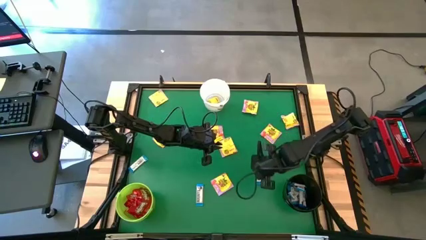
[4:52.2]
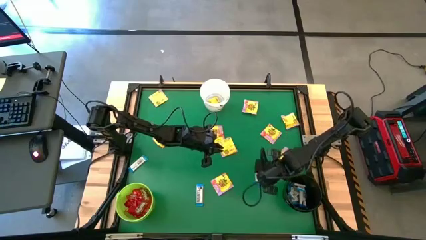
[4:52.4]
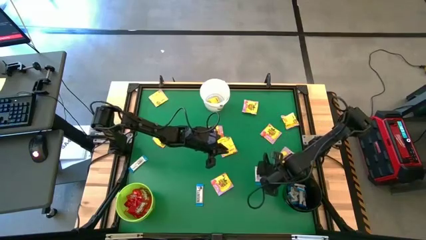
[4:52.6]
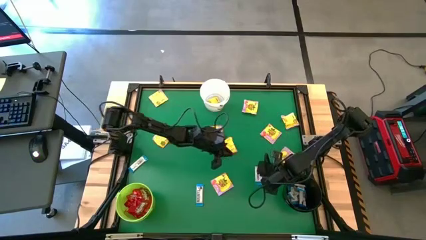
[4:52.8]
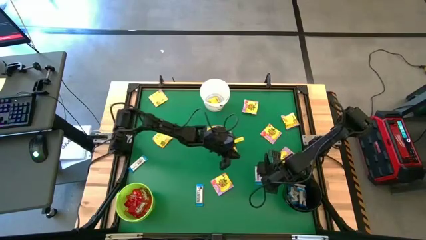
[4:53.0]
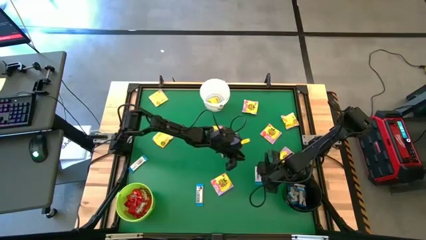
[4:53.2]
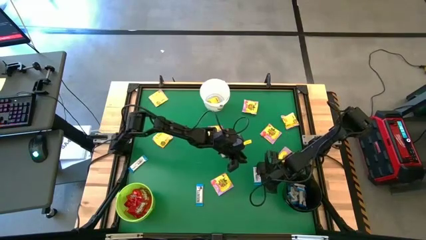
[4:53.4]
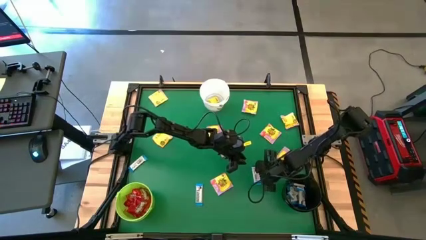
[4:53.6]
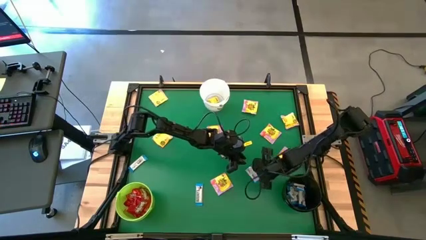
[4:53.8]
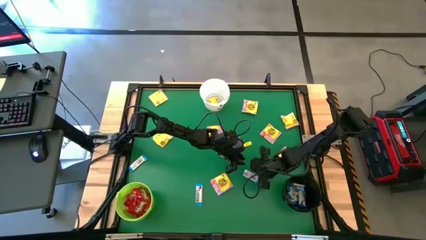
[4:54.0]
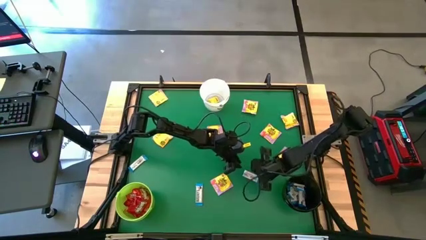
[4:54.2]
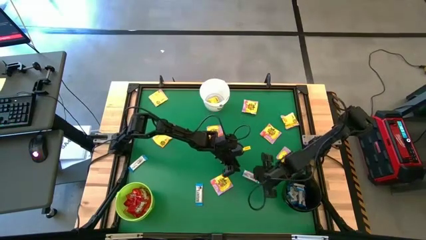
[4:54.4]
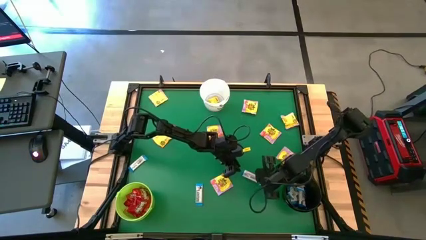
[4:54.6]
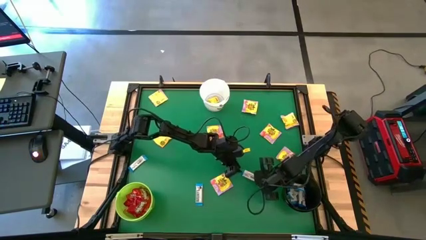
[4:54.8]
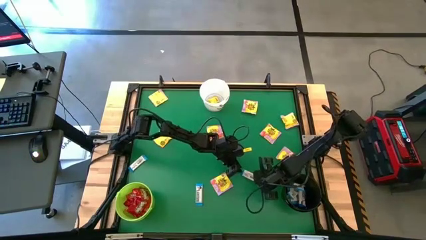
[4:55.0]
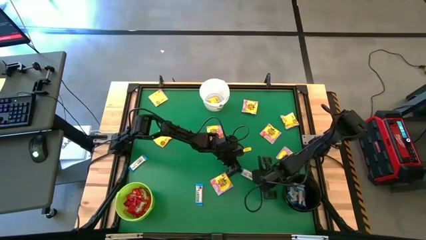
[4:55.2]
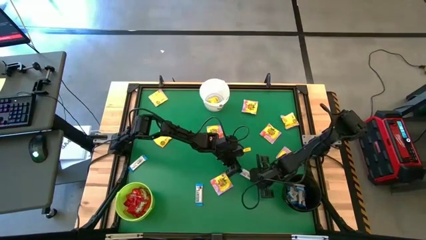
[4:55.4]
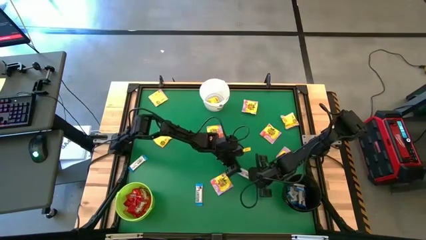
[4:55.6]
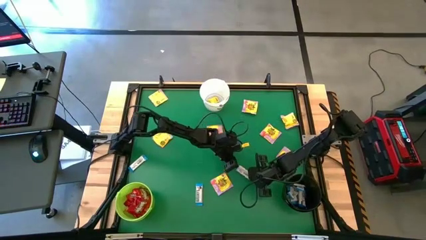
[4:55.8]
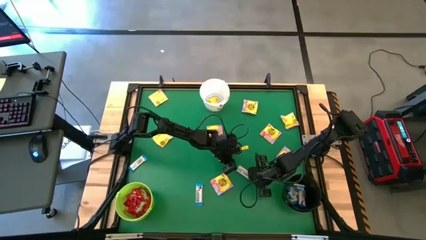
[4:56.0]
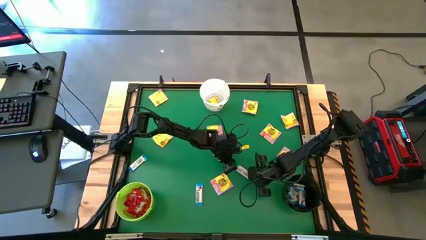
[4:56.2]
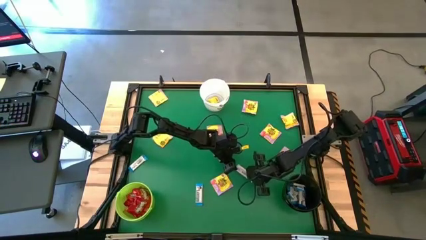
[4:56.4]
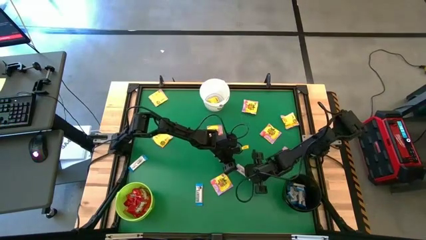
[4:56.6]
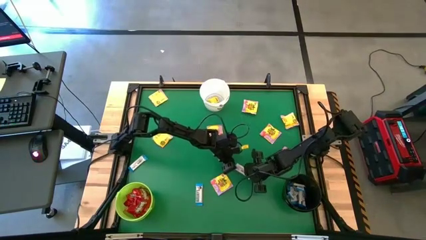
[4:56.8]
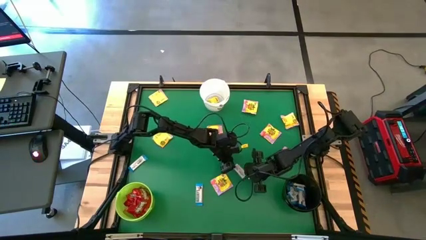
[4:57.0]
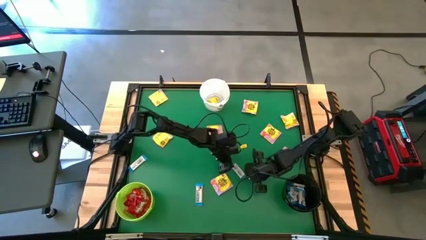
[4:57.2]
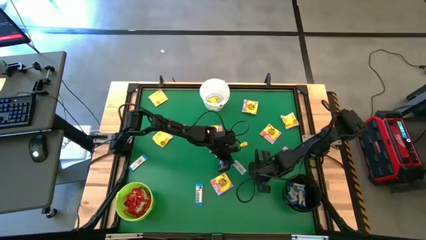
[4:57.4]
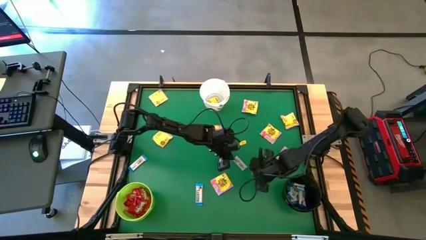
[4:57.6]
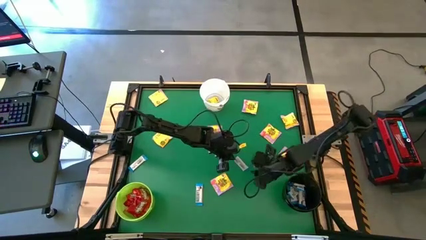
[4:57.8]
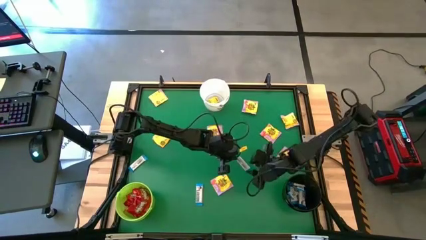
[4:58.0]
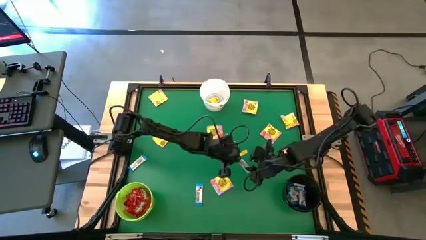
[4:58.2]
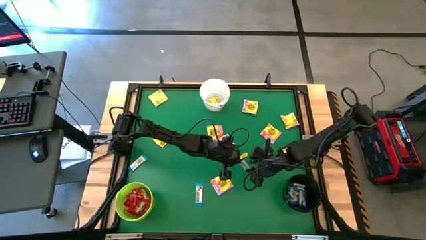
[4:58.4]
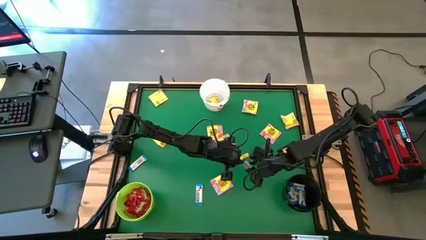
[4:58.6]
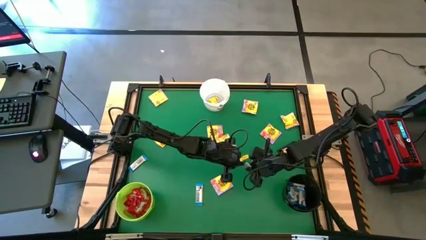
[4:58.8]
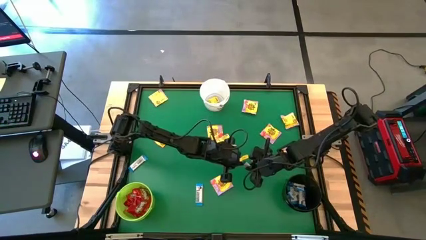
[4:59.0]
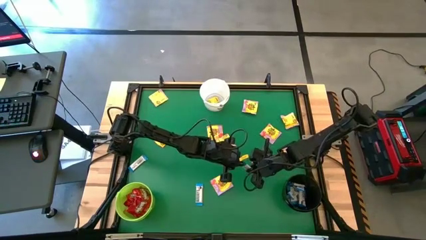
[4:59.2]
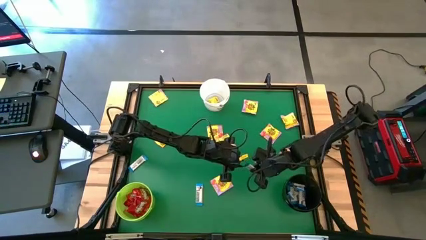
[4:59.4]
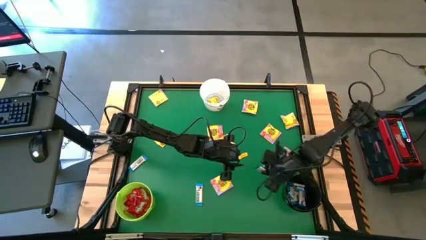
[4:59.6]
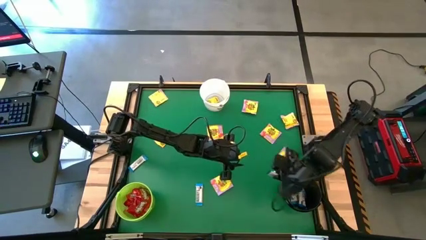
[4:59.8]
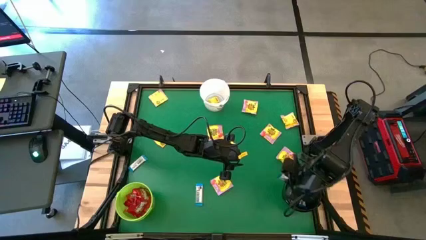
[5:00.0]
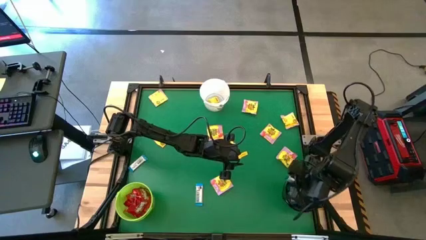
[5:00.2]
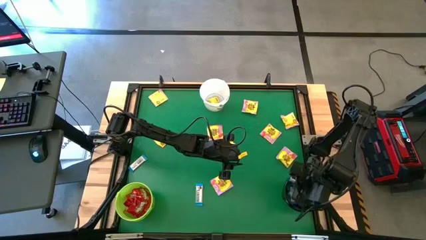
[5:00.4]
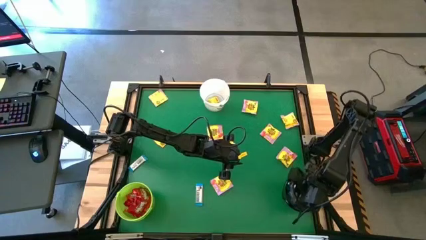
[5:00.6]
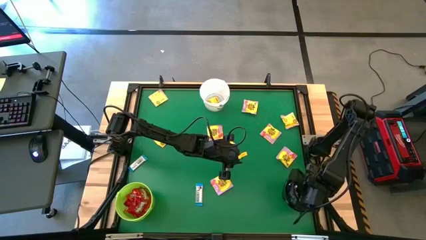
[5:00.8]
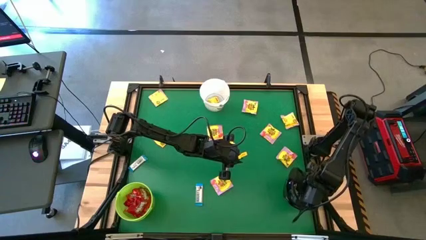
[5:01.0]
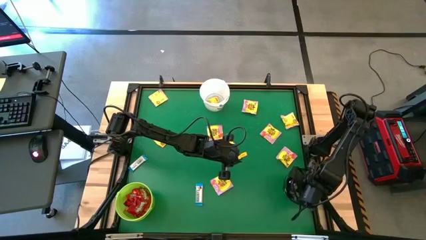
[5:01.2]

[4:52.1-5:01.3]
Task: Sort candy by brand, put in halloween buckets
Put the white candy into the black bucket

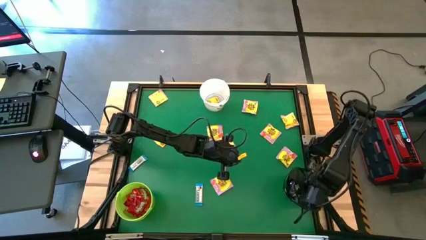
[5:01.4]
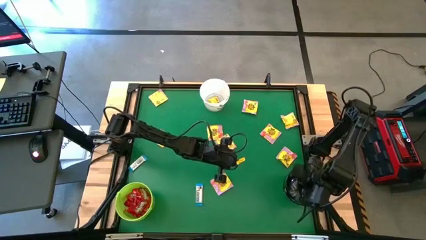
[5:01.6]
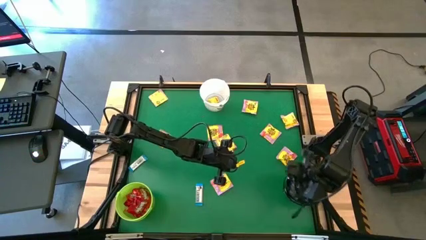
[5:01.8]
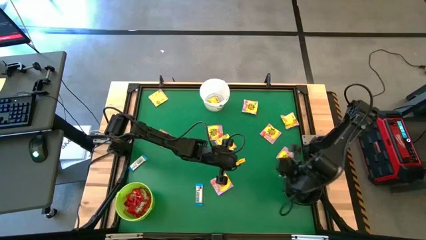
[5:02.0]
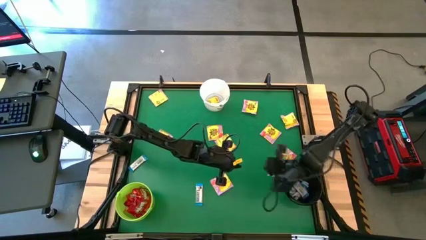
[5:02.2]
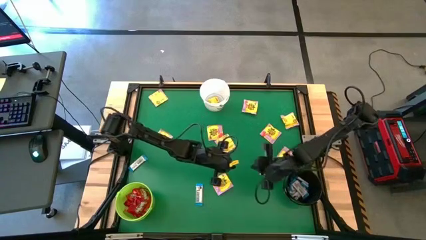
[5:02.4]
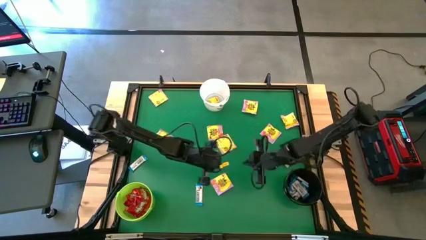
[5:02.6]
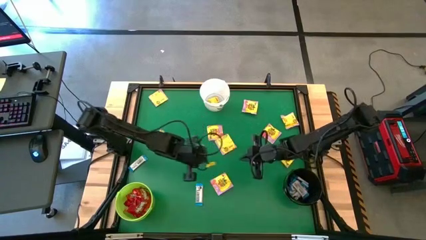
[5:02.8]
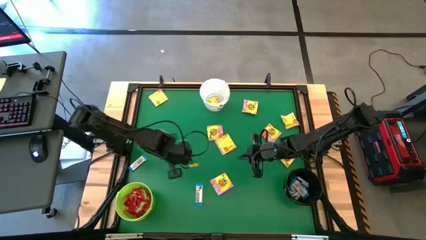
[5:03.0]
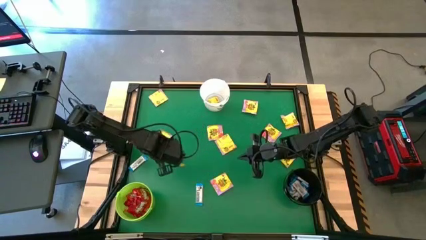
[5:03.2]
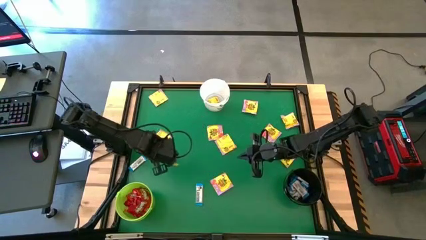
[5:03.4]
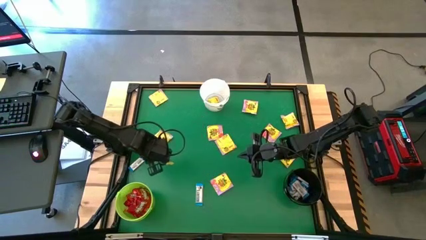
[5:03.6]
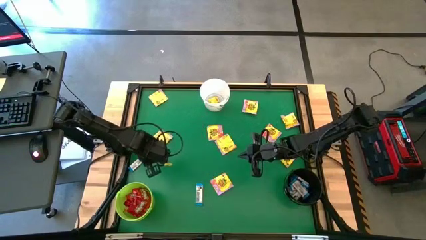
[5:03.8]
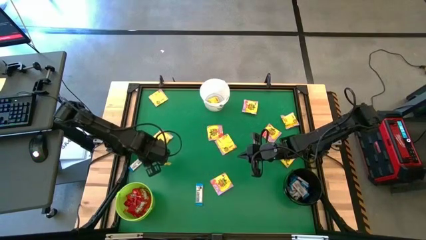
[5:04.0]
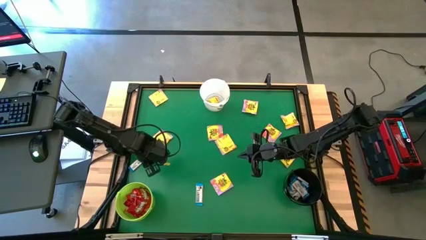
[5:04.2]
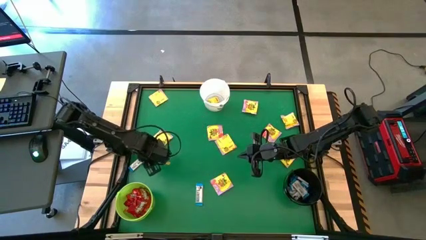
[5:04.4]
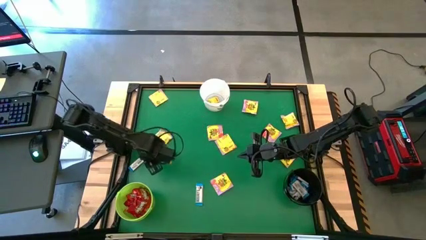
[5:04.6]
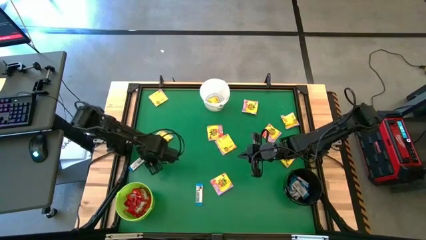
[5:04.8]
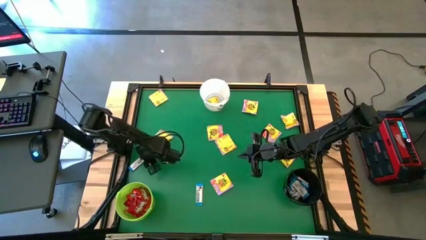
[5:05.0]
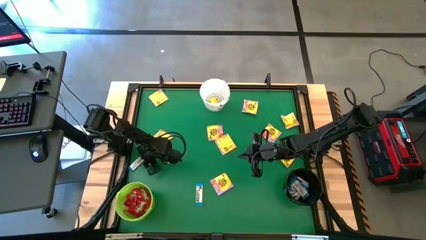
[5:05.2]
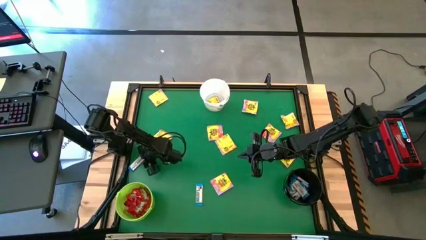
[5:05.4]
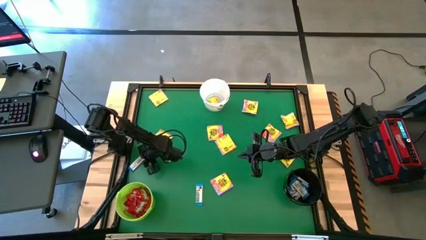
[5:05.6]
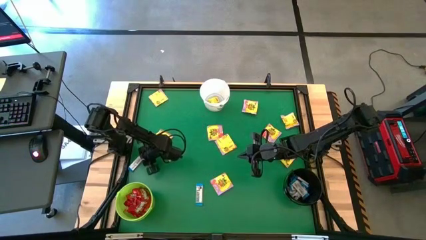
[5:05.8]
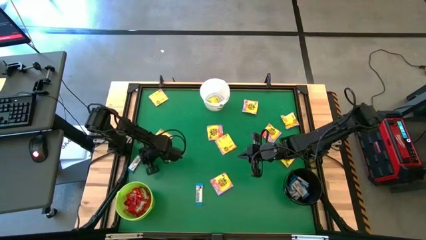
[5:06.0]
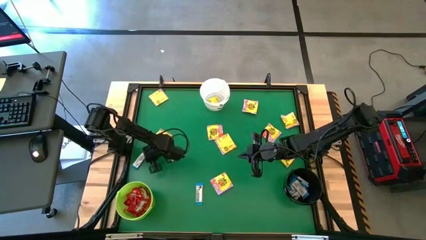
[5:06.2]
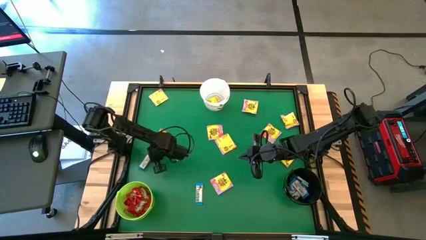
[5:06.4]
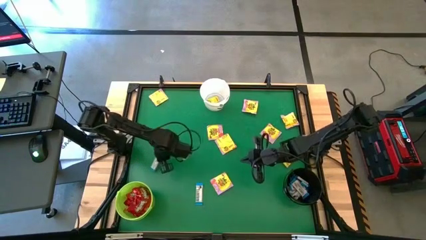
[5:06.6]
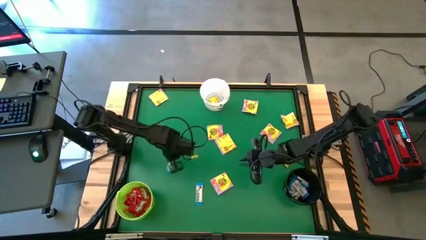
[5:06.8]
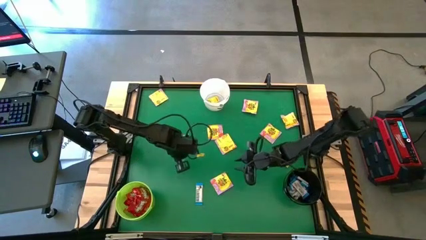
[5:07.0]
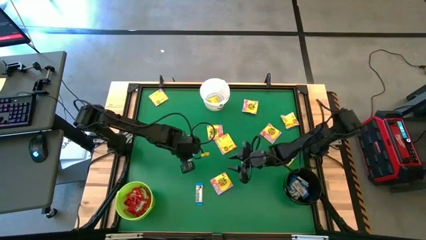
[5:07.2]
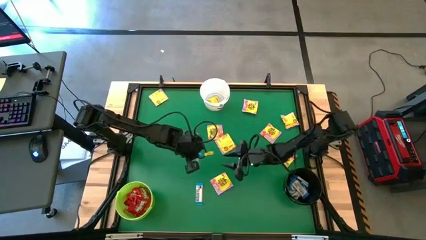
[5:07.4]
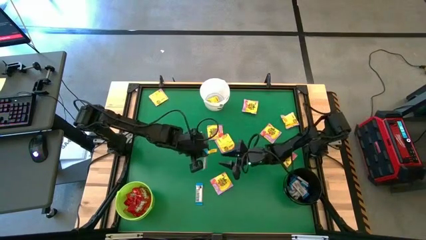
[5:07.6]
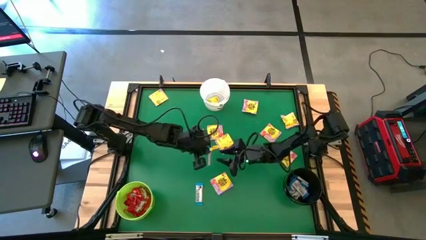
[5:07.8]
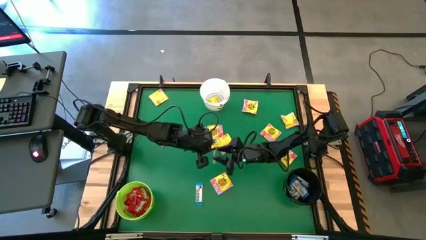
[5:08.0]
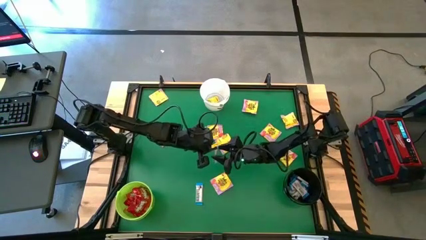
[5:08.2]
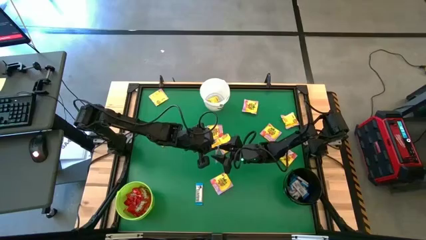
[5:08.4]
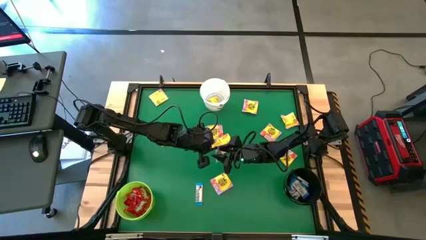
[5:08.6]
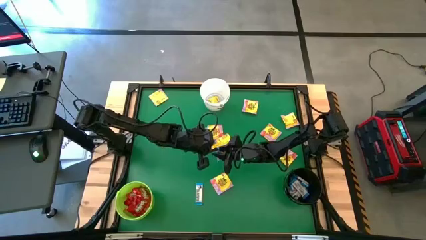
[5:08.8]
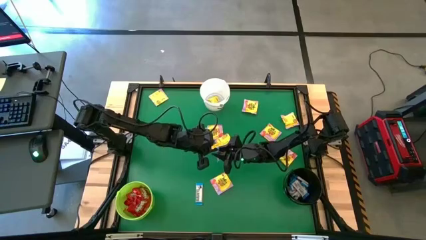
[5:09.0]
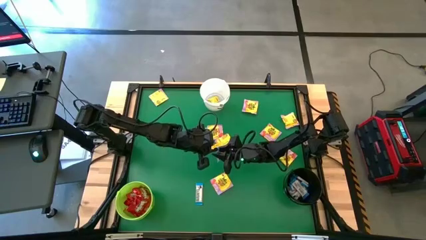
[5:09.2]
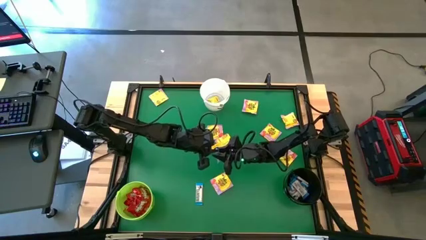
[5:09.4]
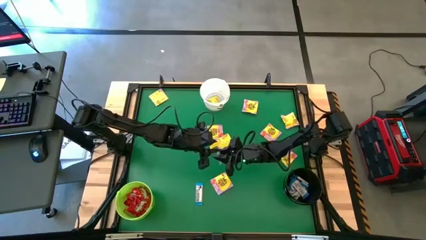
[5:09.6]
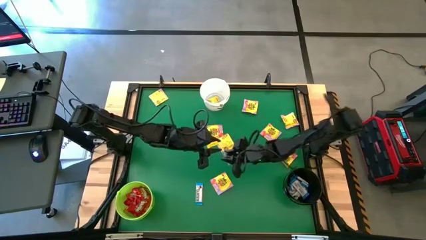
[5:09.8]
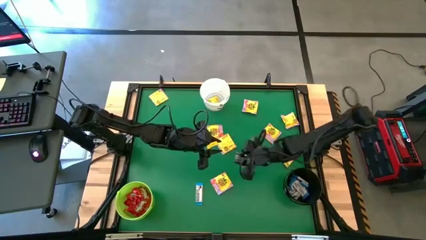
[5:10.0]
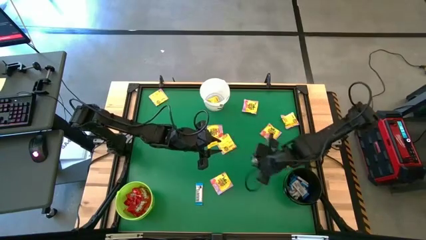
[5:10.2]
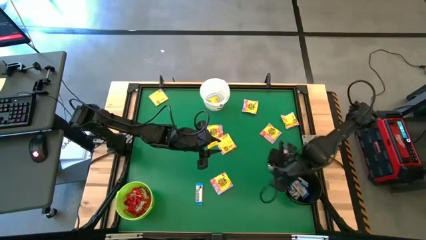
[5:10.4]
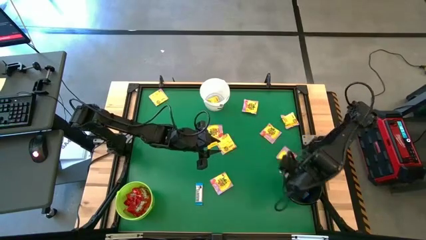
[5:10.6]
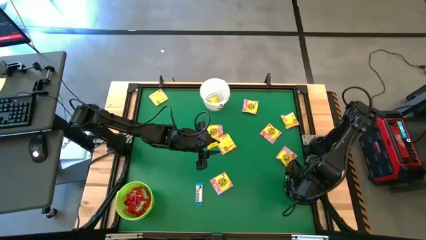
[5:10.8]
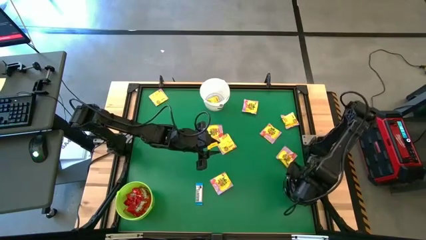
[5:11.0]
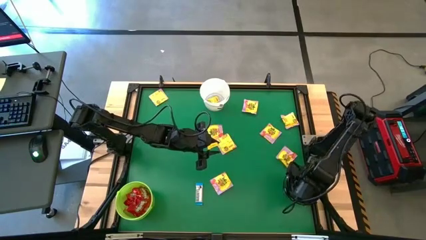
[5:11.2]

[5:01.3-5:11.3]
Put the white candy into the black bucket
